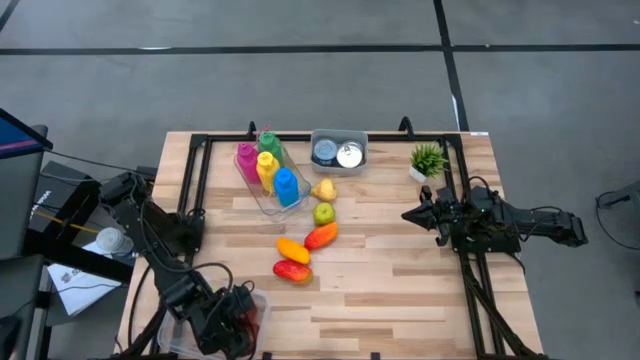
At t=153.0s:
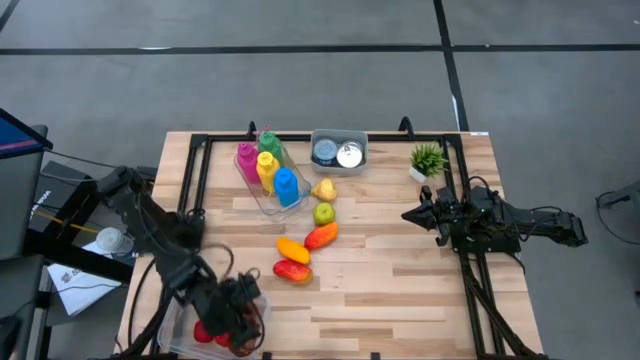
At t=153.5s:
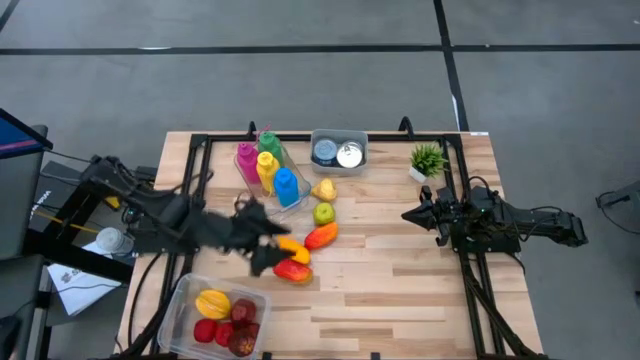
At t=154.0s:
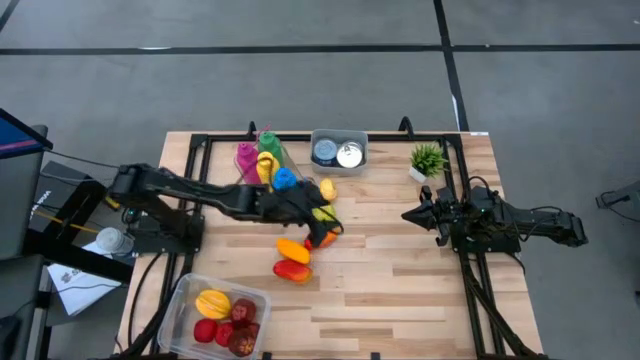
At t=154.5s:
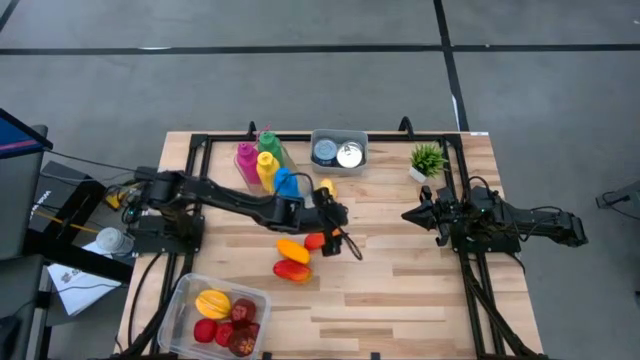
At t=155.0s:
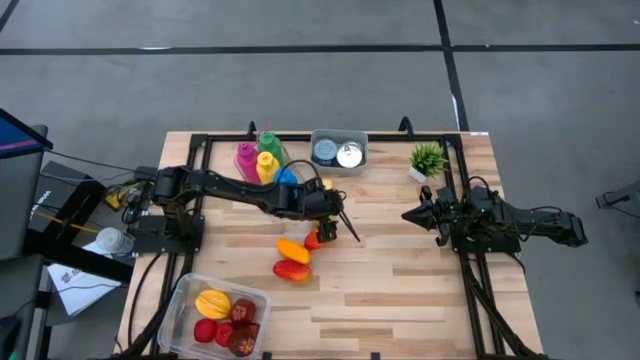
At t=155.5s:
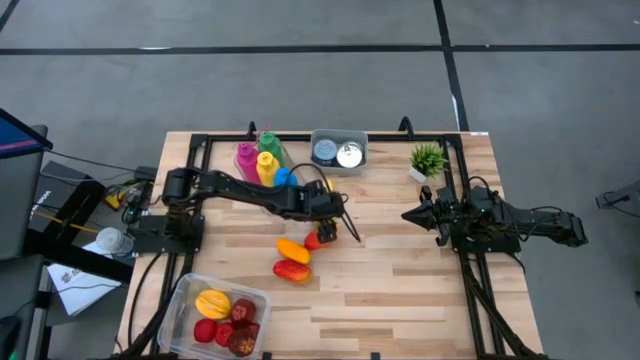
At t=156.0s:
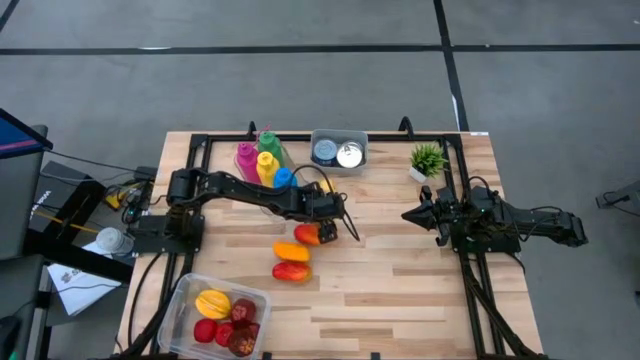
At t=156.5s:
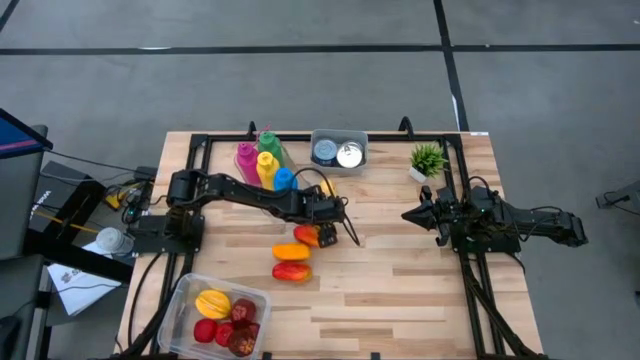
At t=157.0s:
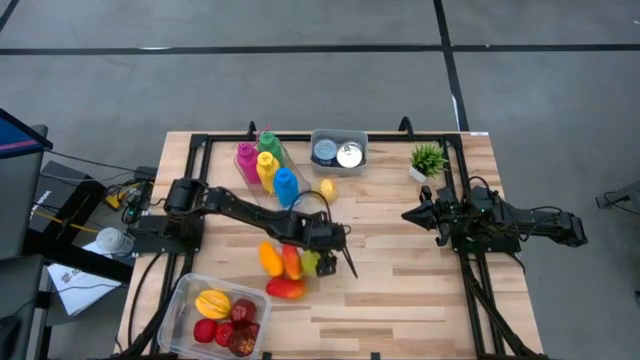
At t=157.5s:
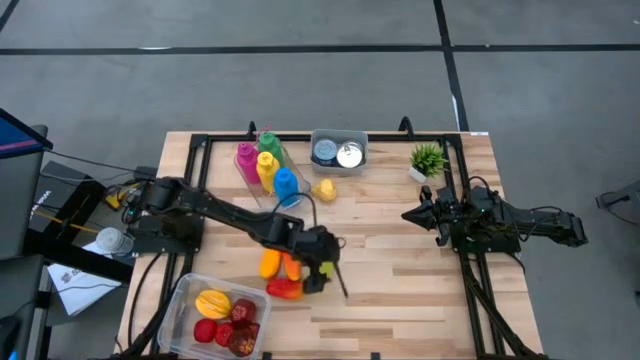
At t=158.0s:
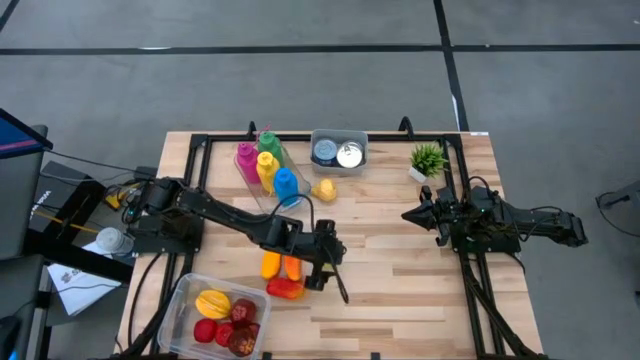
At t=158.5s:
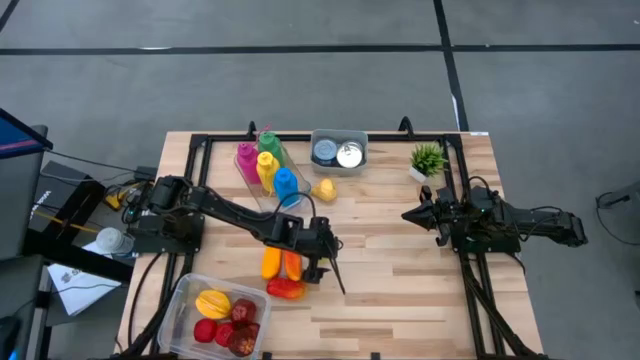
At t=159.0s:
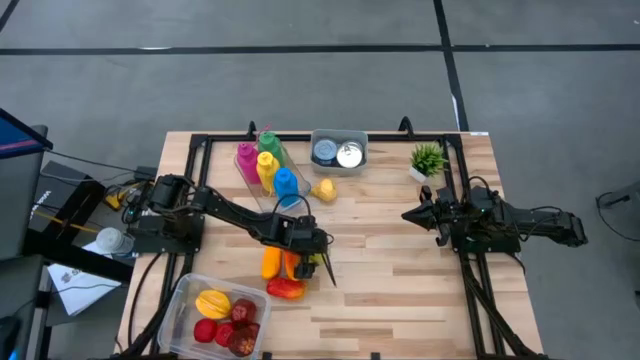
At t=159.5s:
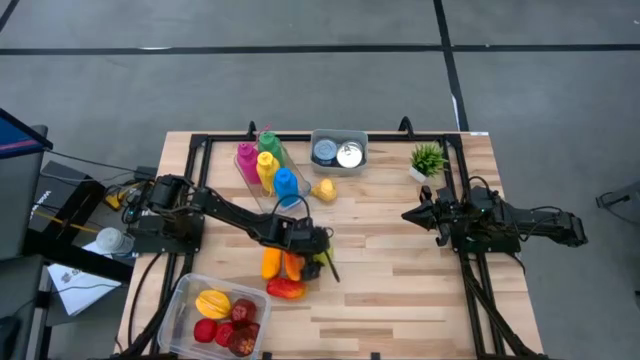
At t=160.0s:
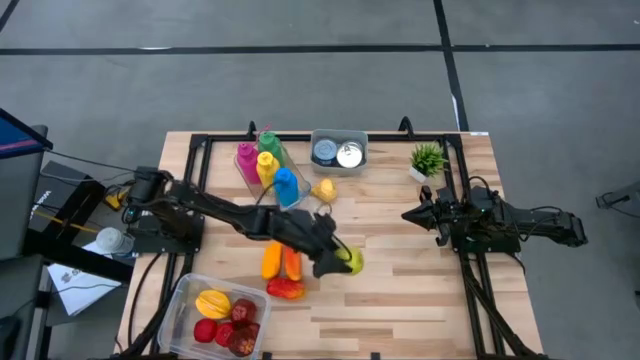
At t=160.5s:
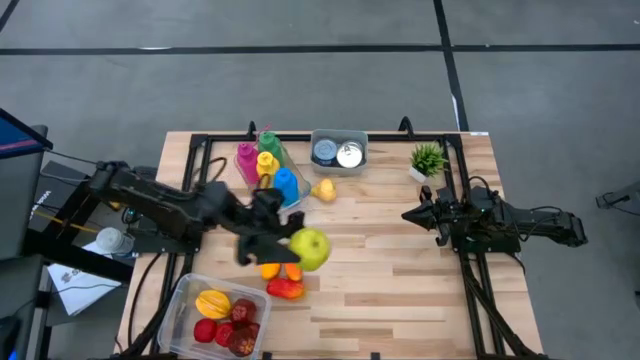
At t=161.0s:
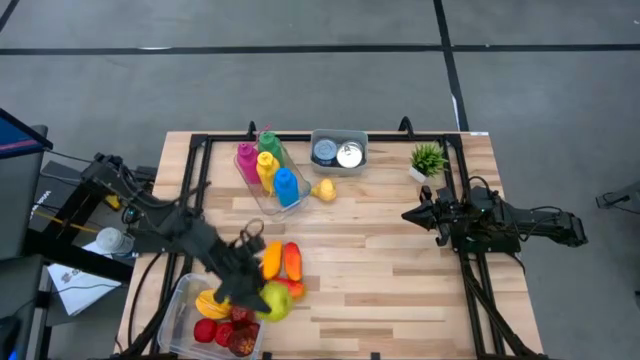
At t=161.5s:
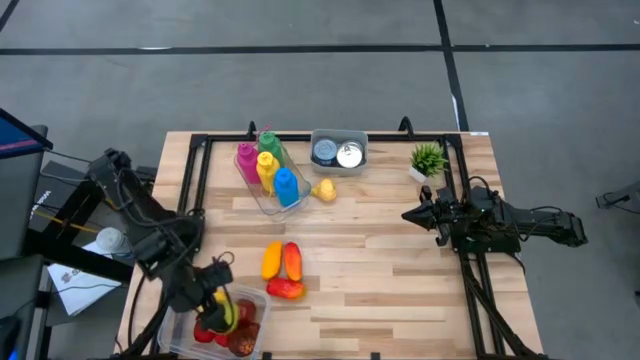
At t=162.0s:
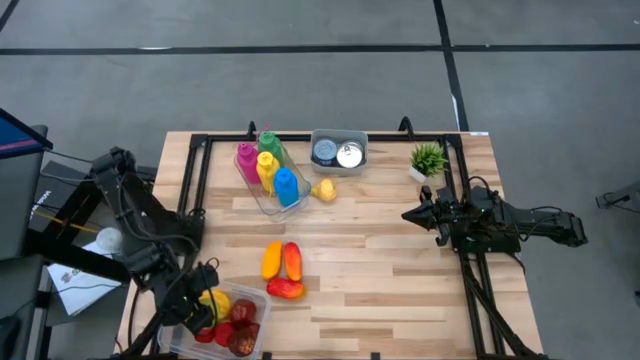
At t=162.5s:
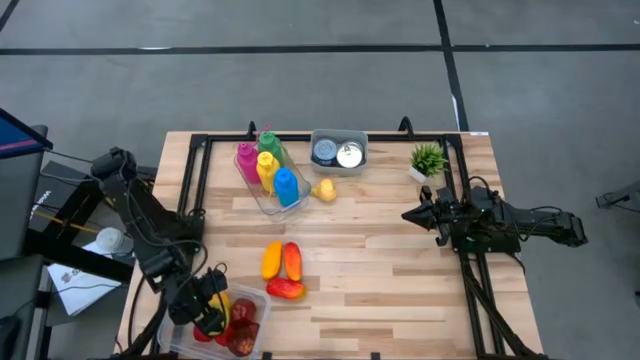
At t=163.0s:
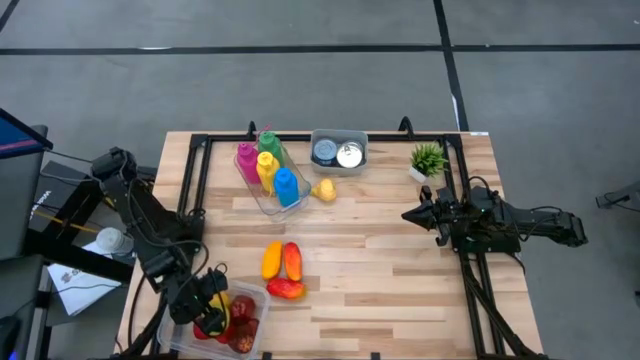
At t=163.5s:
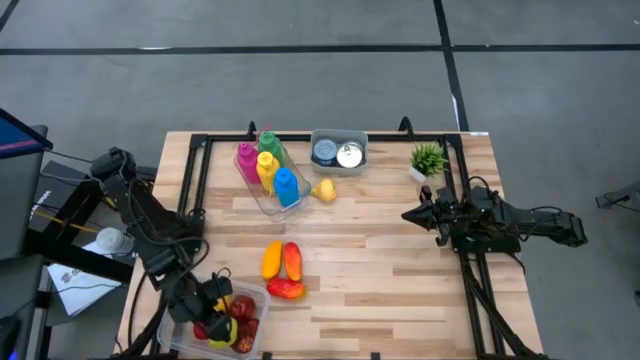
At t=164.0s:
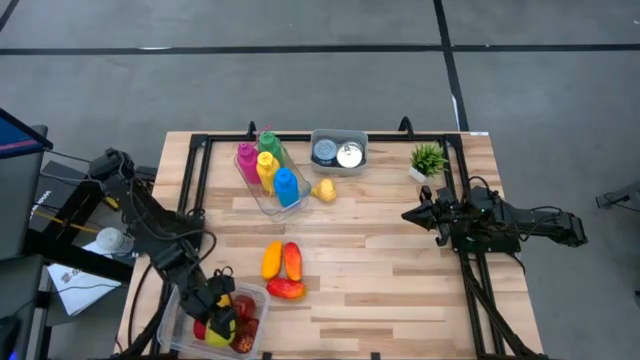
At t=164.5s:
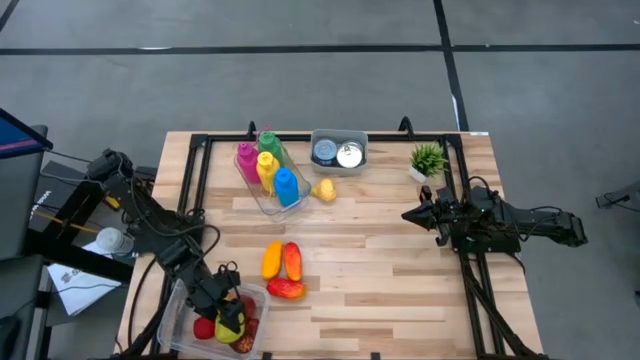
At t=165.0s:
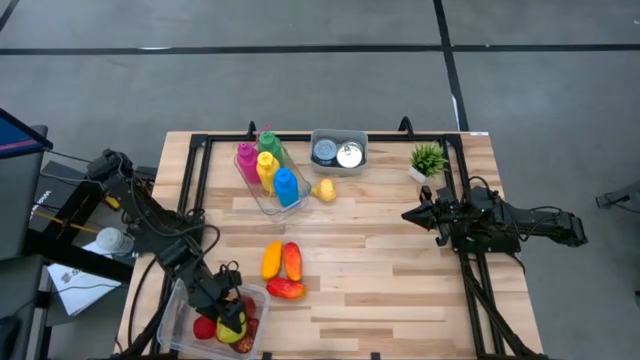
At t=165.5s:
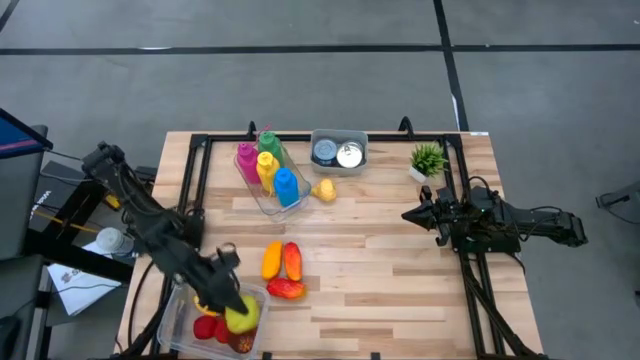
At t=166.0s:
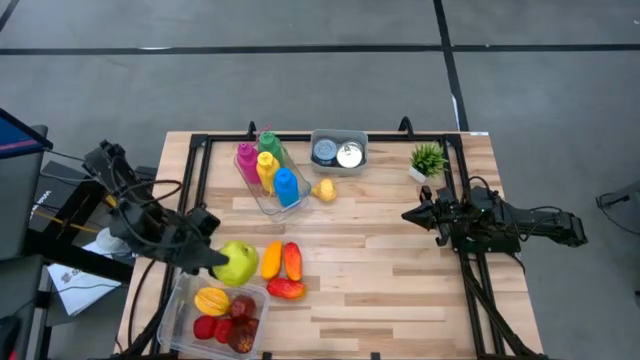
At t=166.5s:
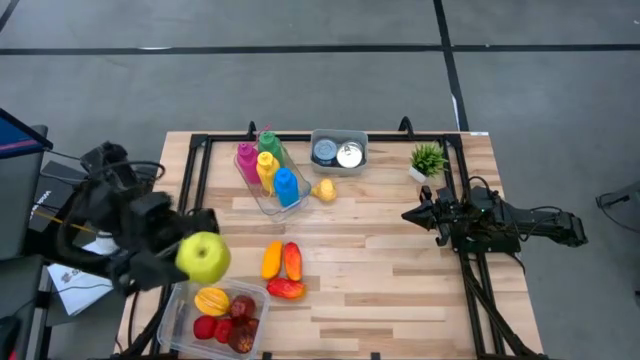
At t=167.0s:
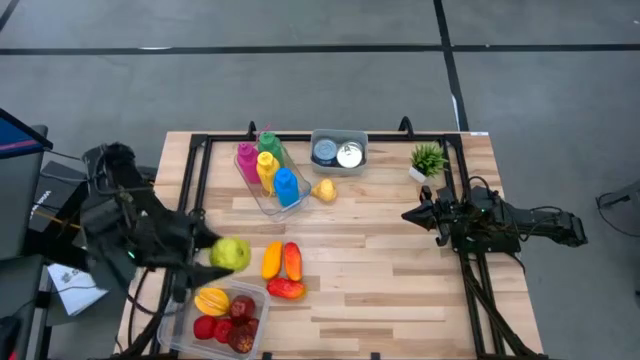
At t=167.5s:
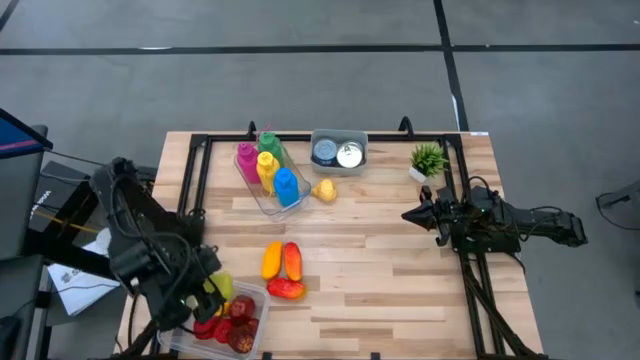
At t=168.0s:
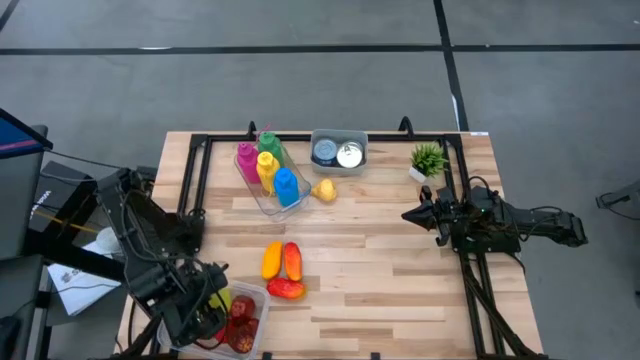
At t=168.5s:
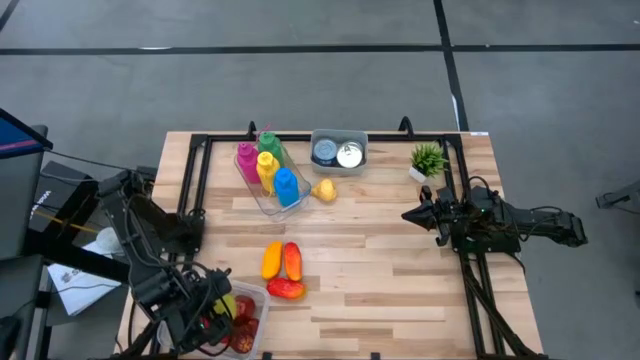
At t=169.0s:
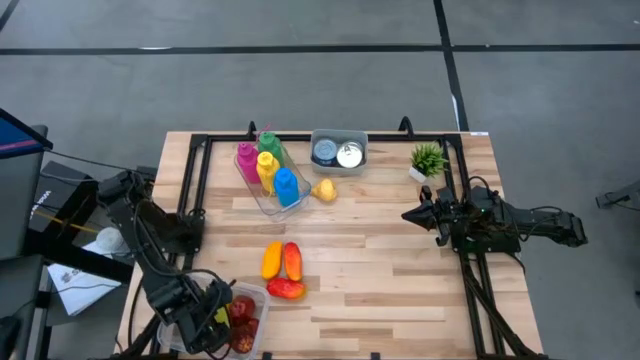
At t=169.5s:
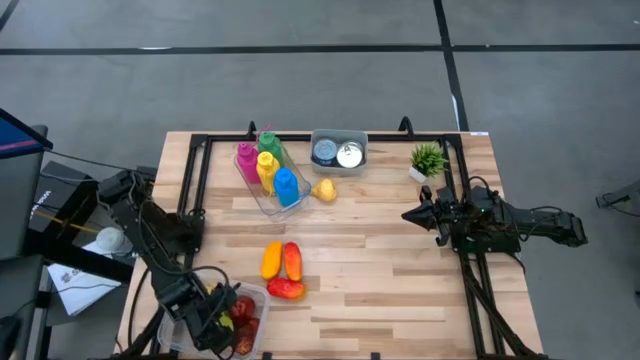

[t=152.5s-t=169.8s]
Task: Pick & Place Food Item
Put the green apple into the white bin

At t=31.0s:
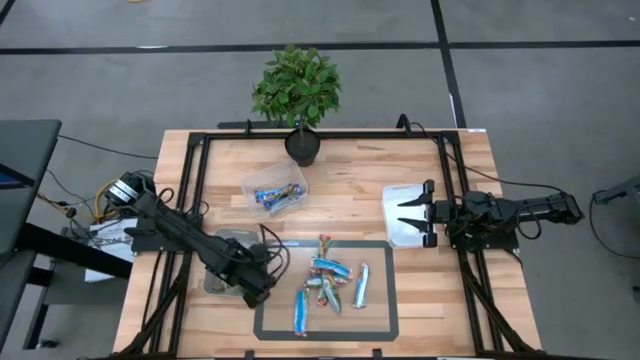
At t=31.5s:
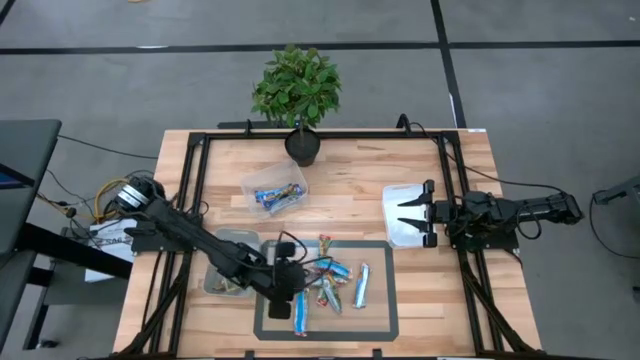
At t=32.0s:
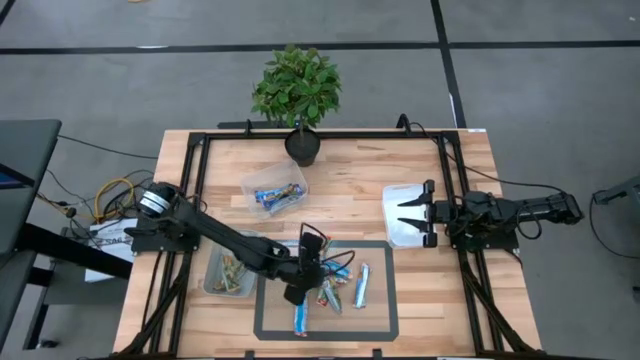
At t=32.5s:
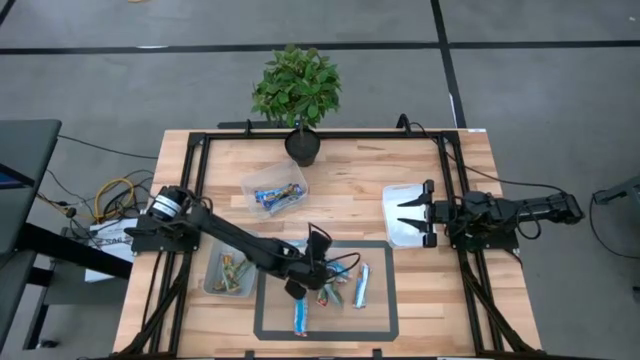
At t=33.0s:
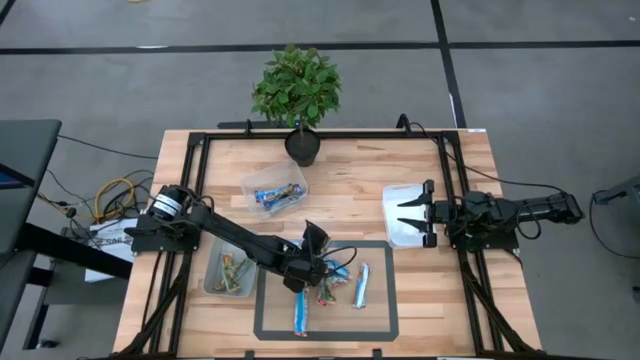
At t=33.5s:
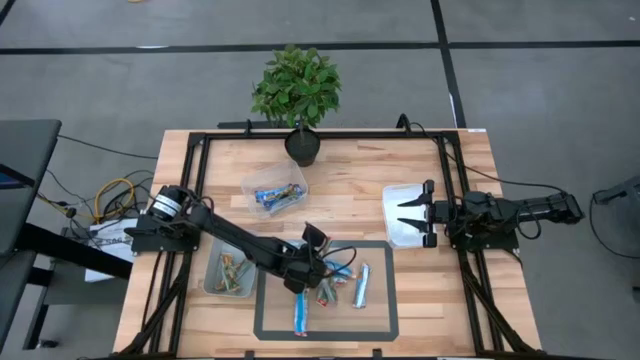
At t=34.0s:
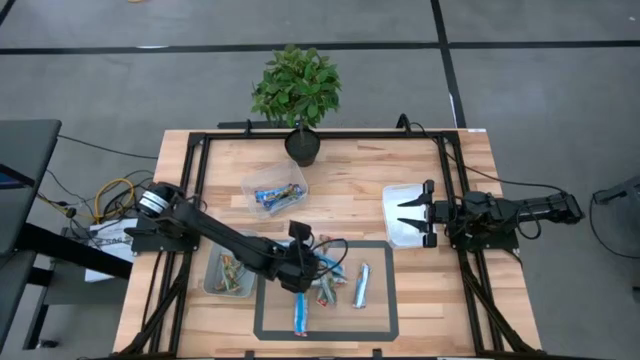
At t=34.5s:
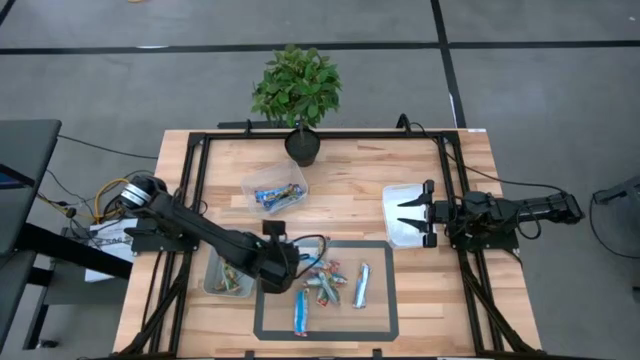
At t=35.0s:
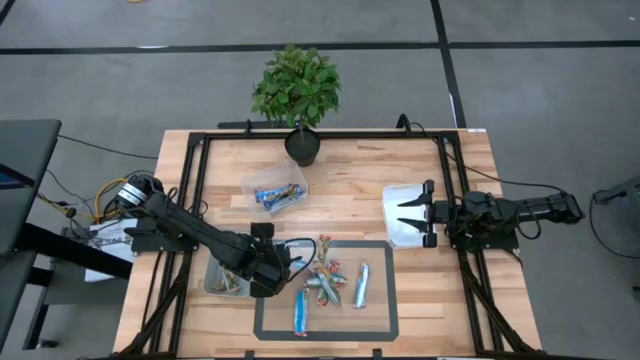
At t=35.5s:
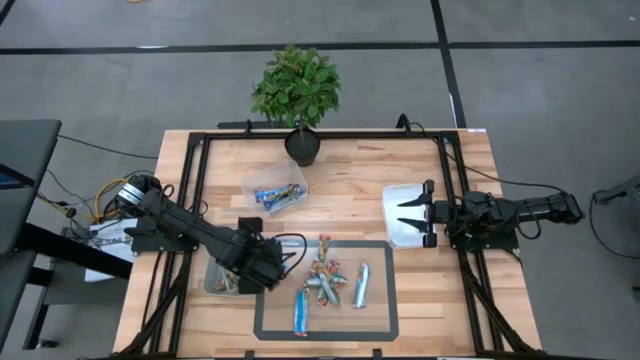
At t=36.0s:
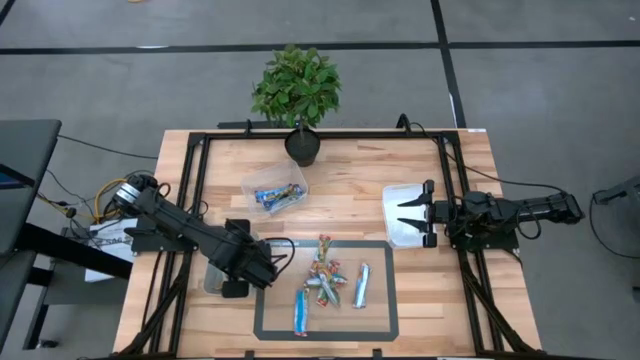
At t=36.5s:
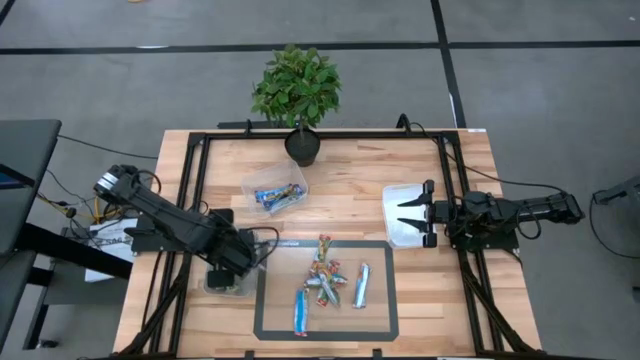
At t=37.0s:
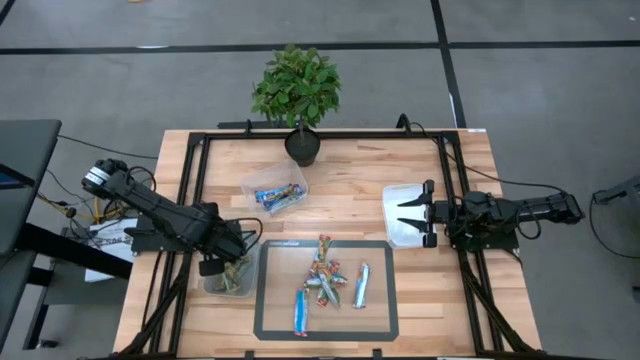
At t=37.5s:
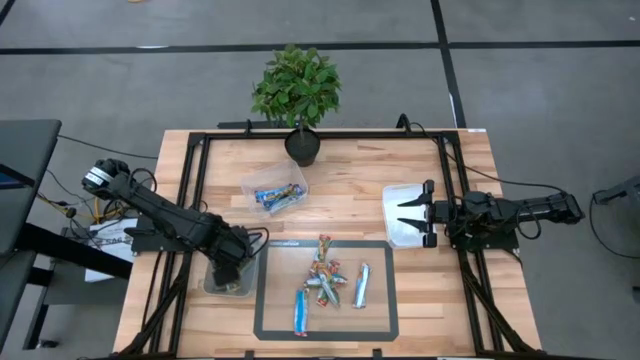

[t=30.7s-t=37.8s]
Task: Pick and place Granola Bars by type
Put the yellow granola bar into the gray bin
